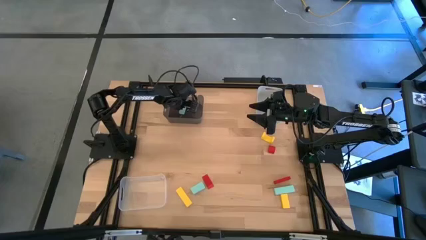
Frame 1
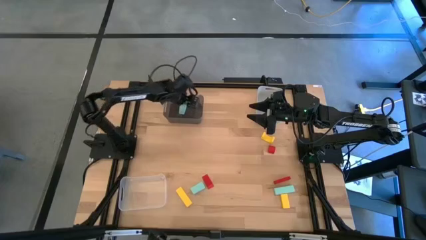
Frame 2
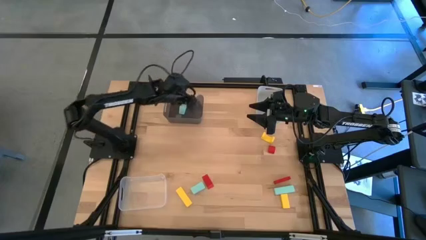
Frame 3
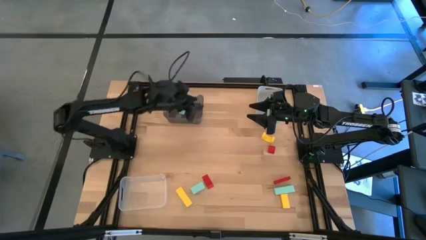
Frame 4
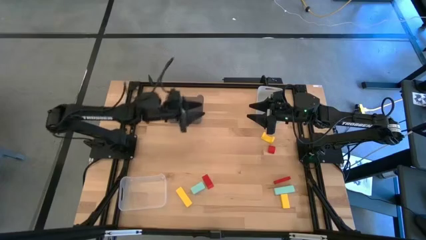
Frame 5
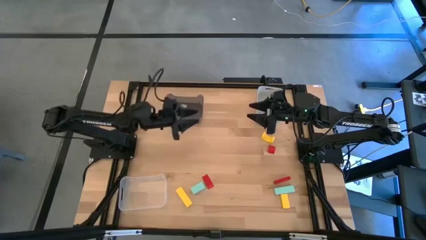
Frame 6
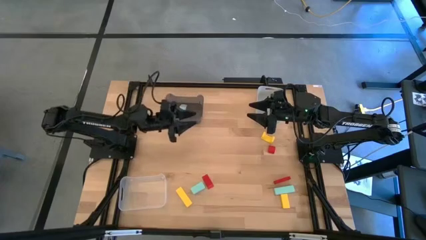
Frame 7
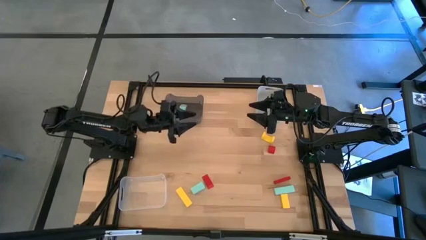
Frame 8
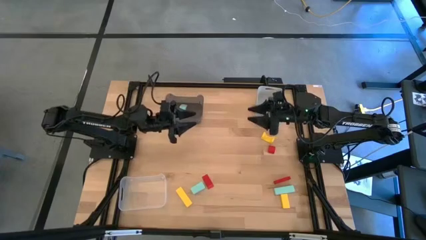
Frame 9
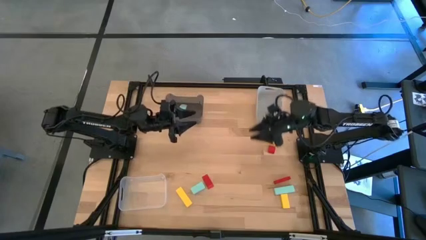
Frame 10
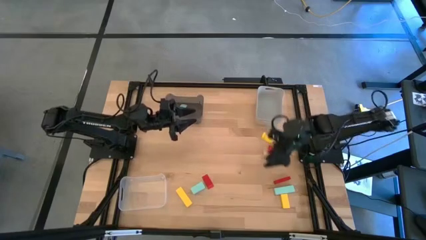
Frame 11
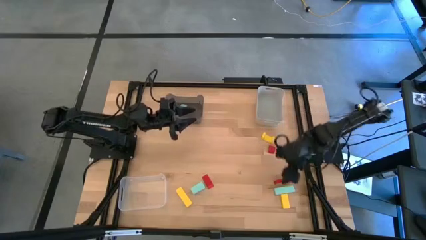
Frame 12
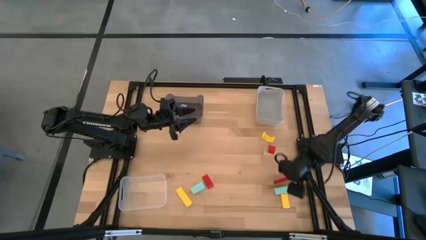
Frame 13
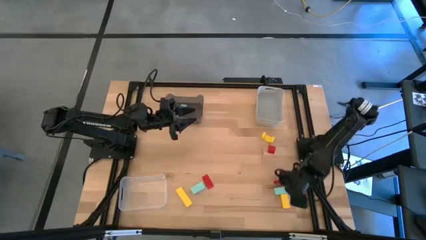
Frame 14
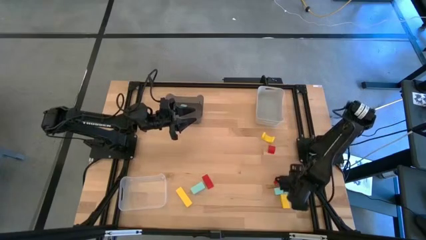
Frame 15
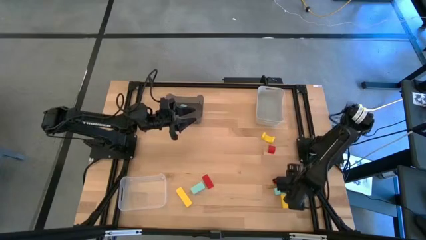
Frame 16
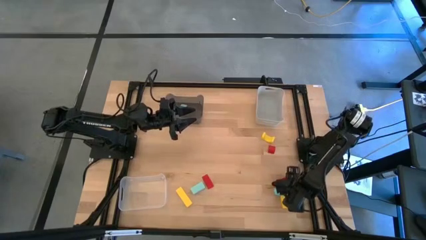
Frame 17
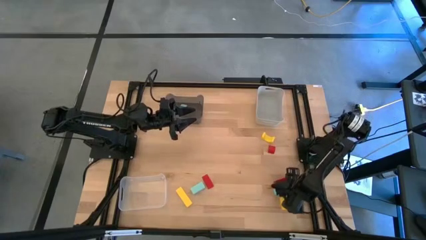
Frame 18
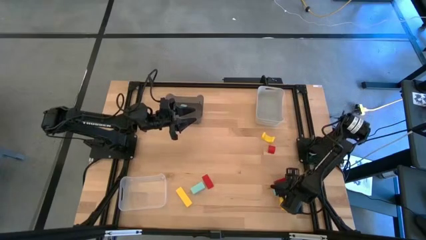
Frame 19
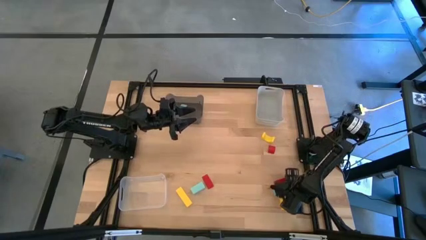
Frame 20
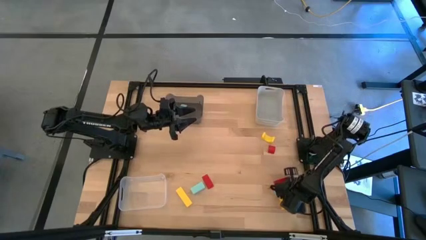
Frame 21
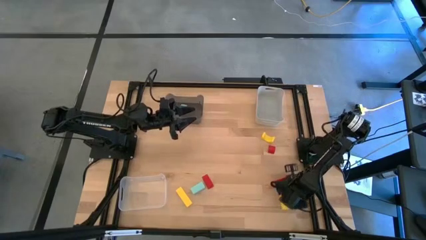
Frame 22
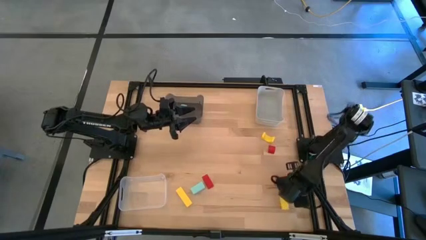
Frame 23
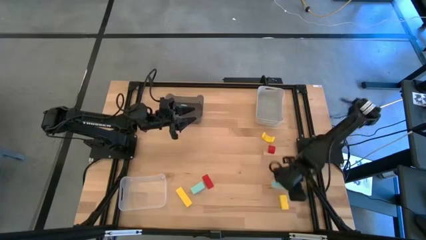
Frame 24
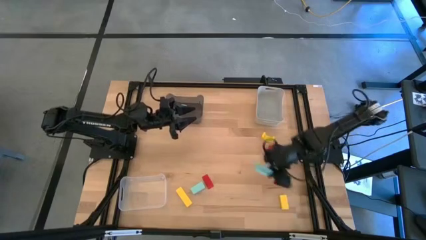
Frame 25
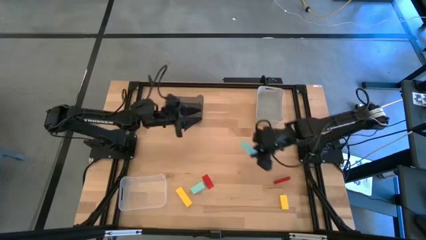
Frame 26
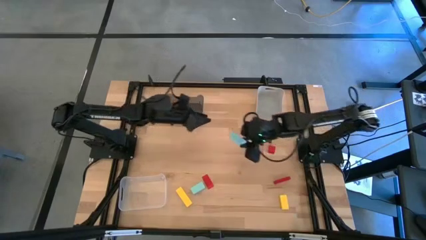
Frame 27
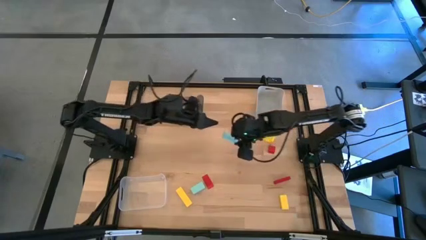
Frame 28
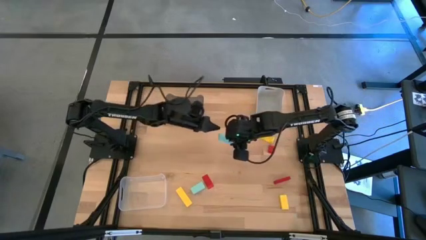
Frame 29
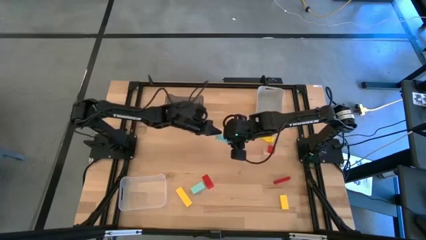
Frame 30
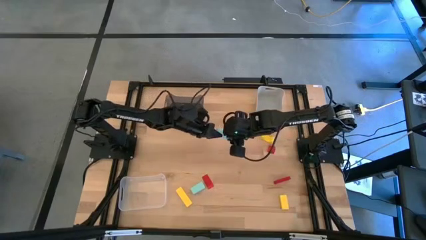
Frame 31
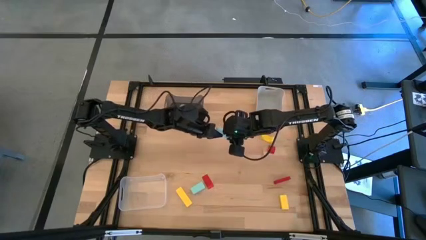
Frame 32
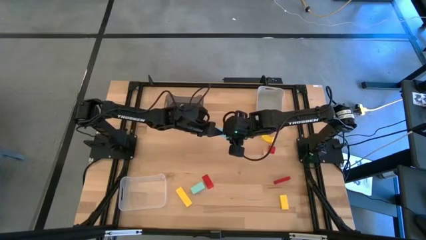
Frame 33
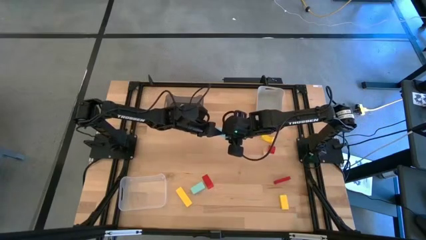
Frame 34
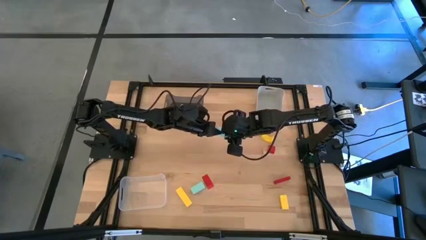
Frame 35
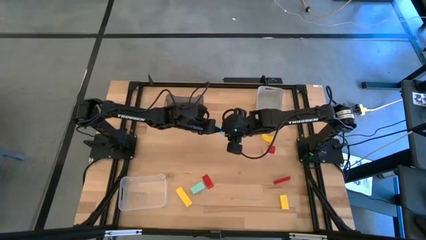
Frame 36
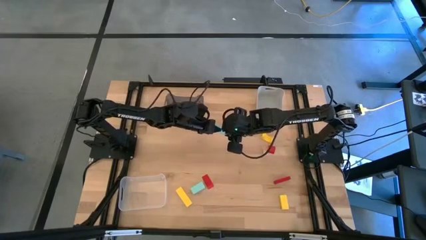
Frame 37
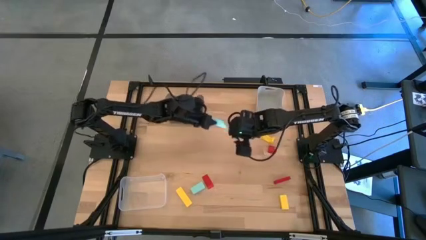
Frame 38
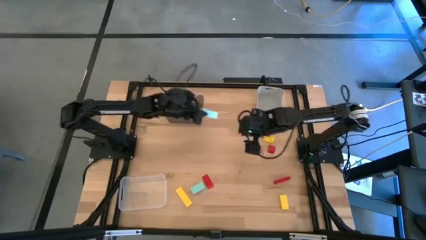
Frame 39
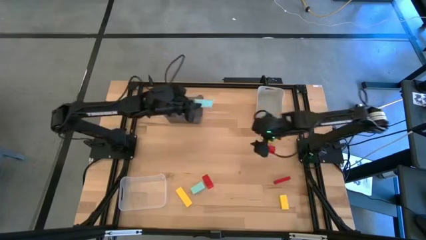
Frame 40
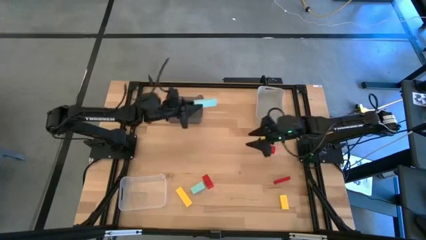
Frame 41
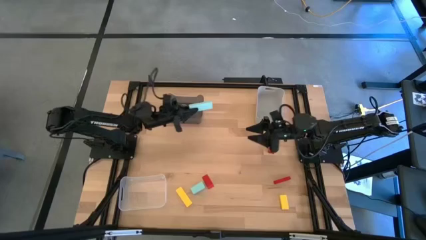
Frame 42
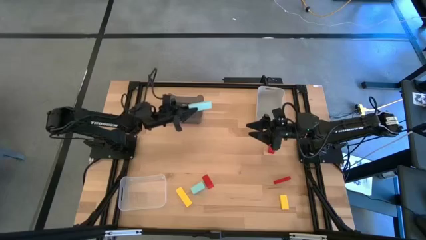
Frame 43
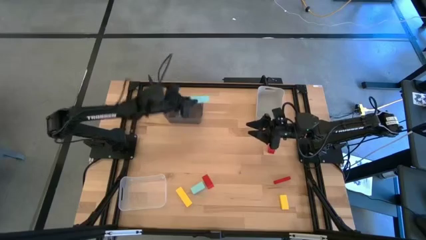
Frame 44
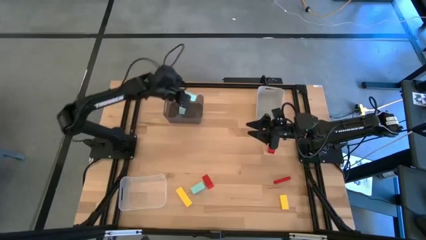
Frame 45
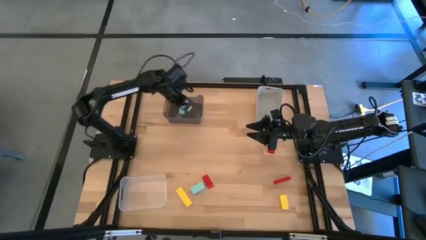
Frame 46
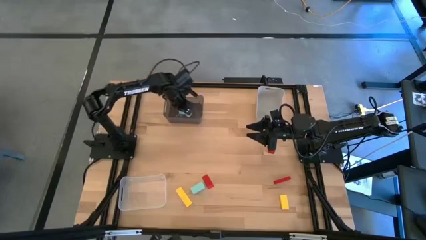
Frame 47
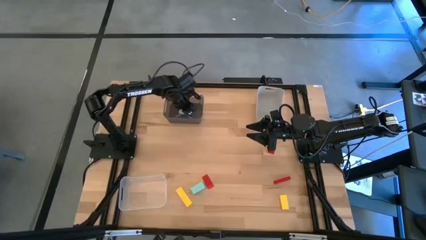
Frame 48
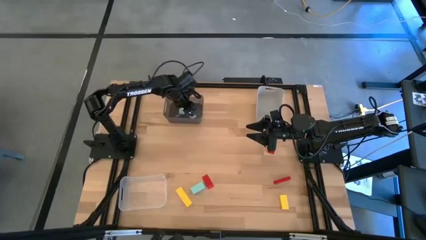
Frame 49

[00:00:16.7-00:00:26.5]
Task: Sort & place blocks by color
Put the right light blue block into the black bin

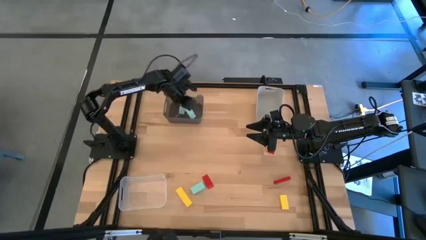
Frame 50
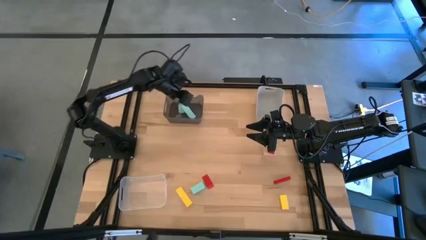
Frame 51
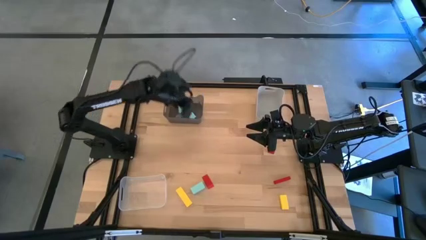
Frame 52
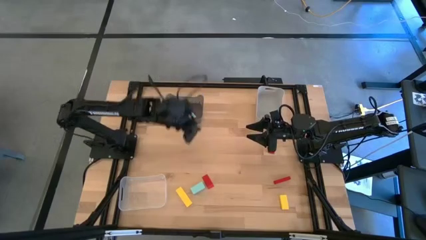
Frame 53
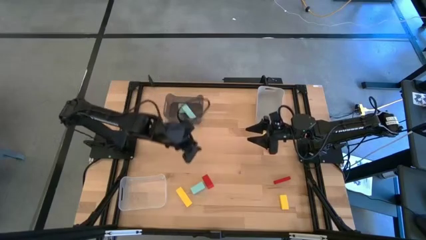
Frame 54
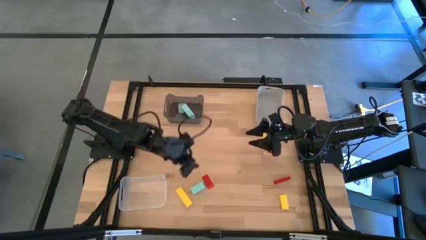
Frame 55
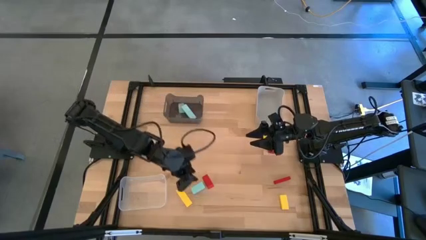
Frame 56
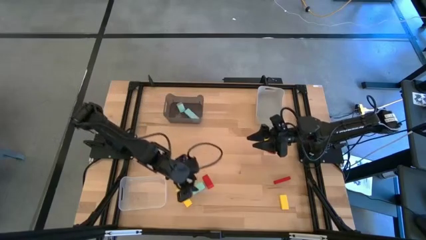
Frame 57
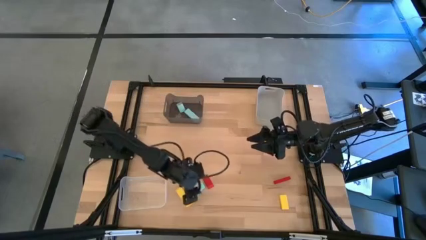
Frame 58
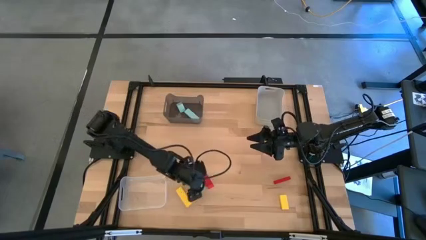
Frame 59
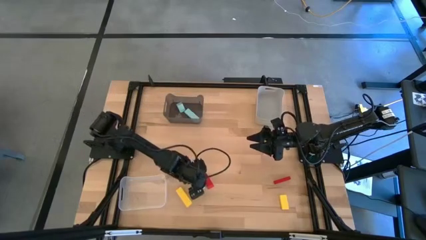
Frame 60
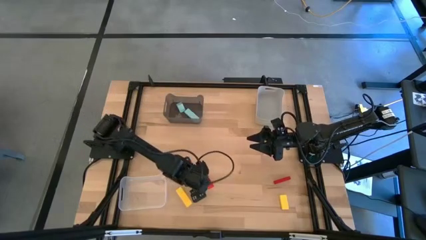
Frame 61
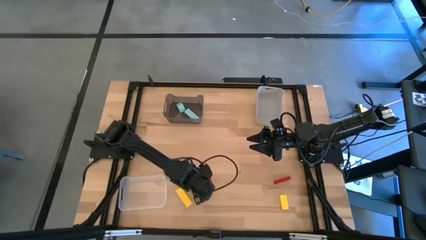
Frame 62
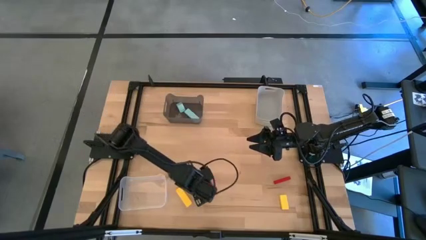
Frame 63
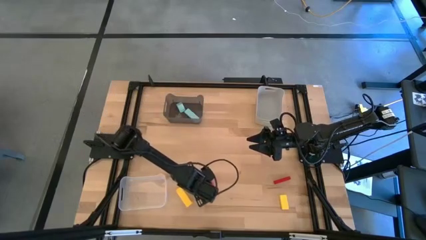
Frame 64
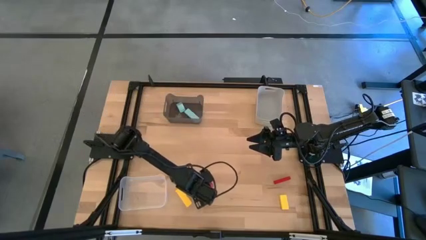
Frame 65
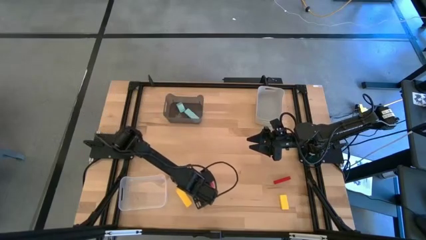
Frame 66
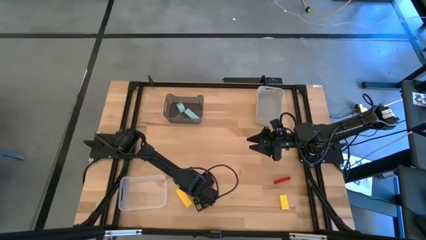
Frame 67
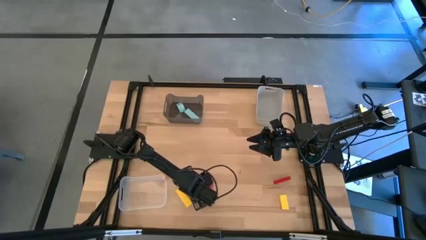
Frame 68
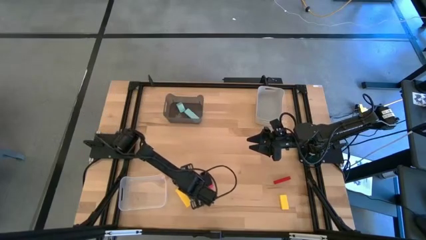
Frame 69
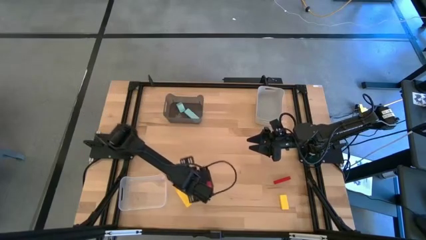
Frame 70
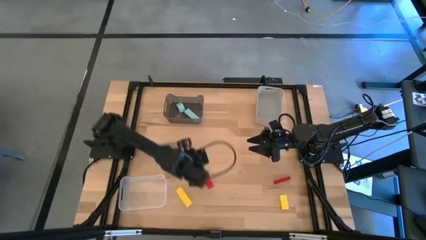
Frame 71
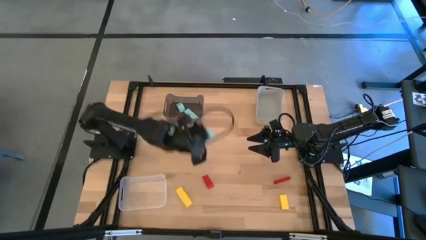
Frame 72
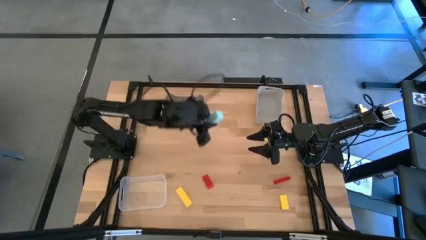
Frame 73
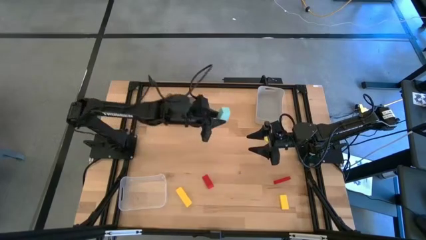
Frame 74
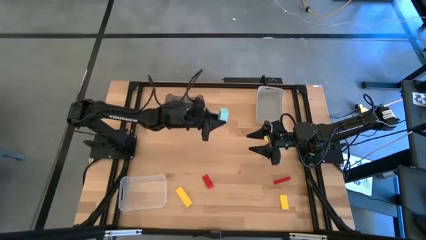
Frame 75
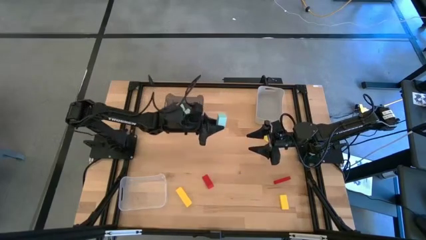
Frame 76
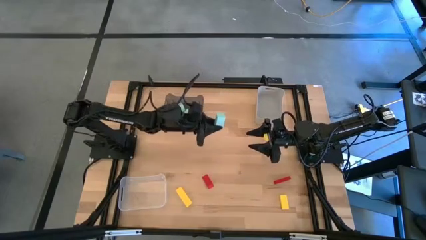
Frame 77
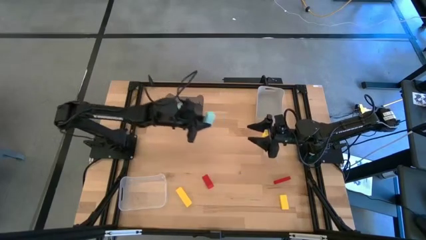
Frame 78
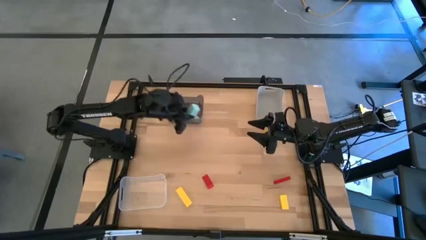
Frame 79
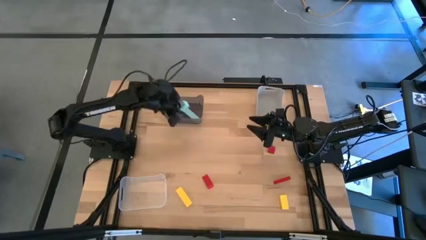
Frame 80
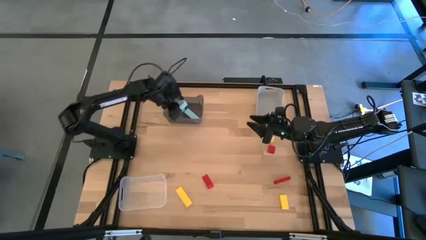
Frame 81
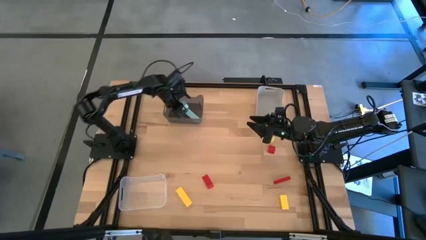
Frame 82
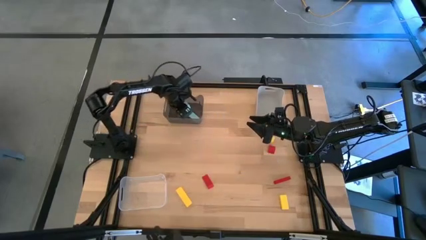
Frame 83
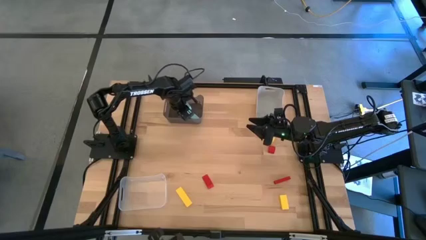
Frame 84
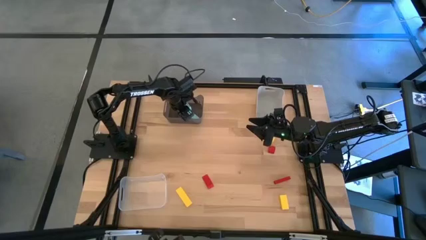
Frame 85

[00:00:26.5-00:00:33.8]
Put the light blue block into the black bin
